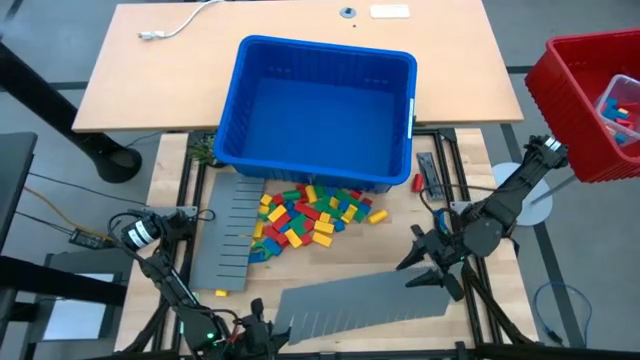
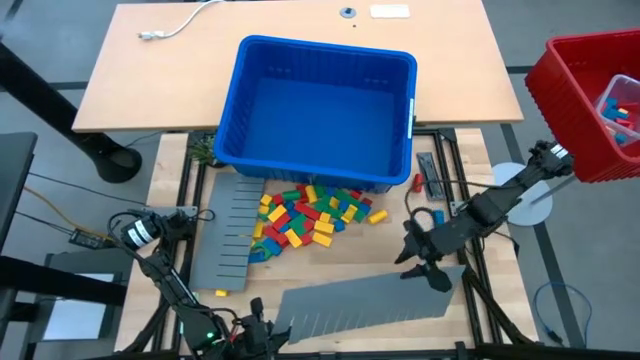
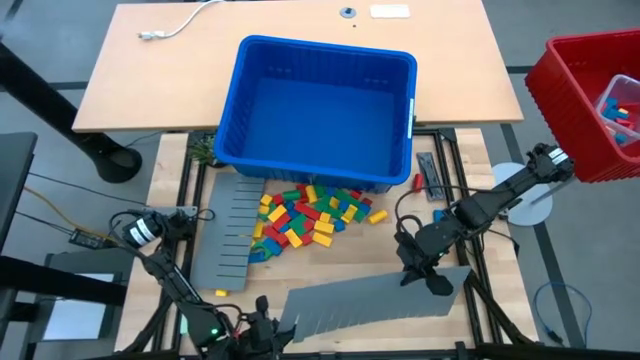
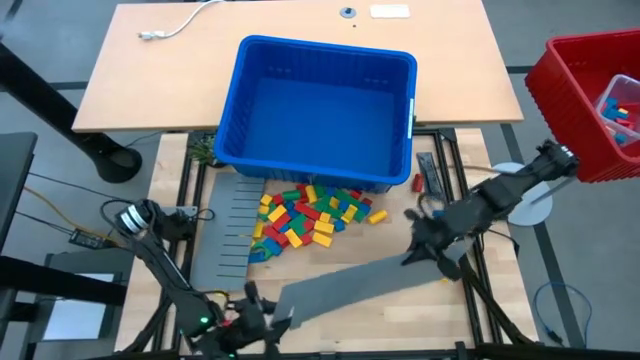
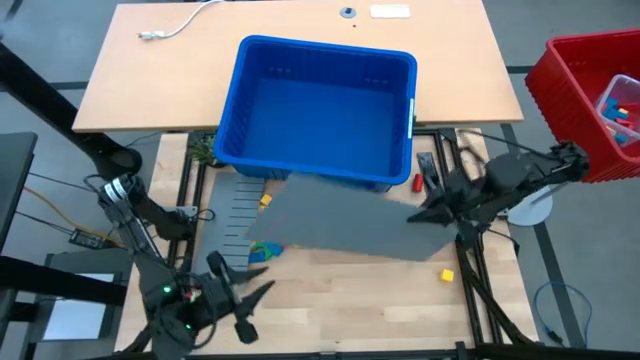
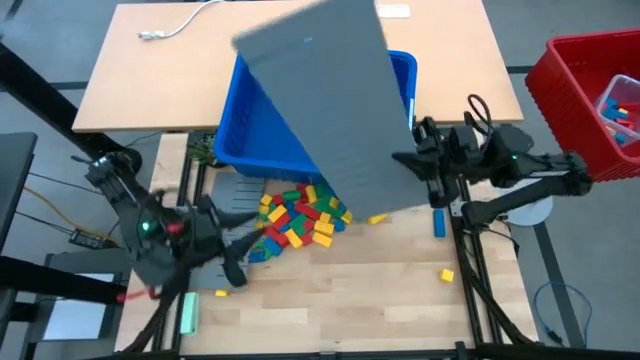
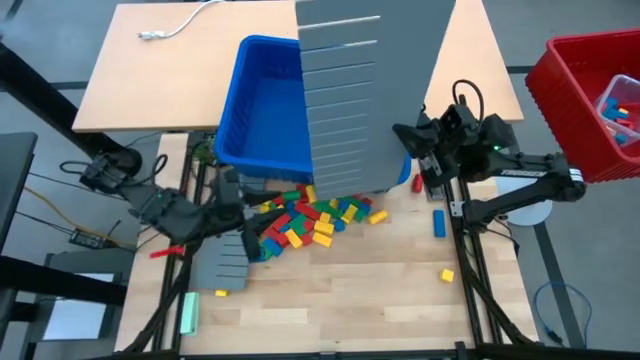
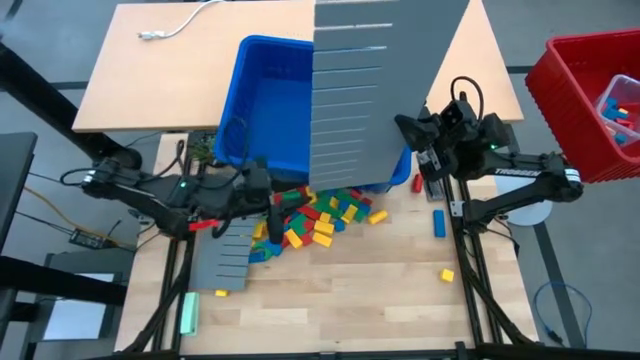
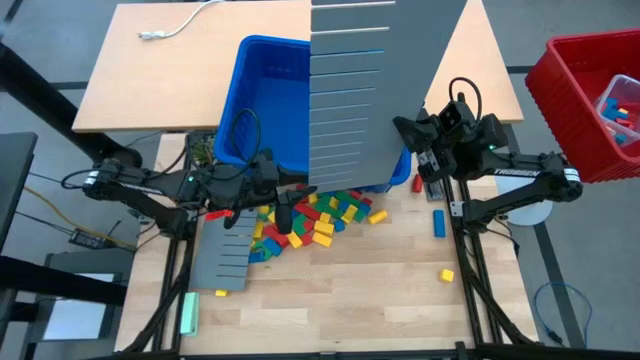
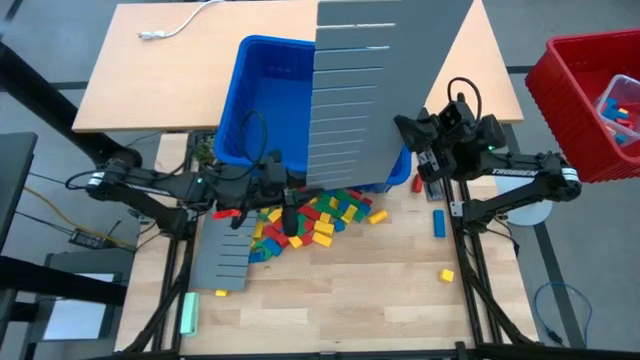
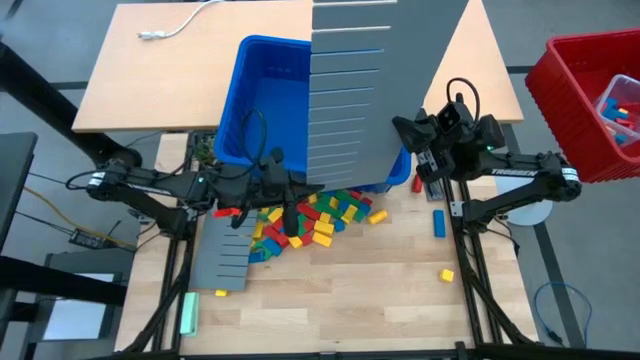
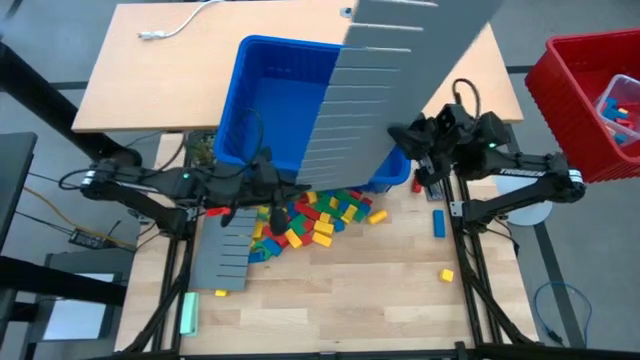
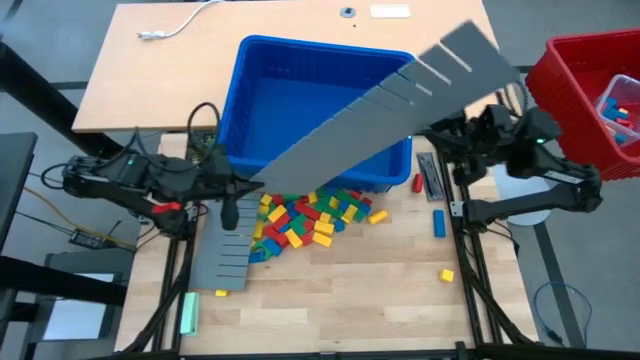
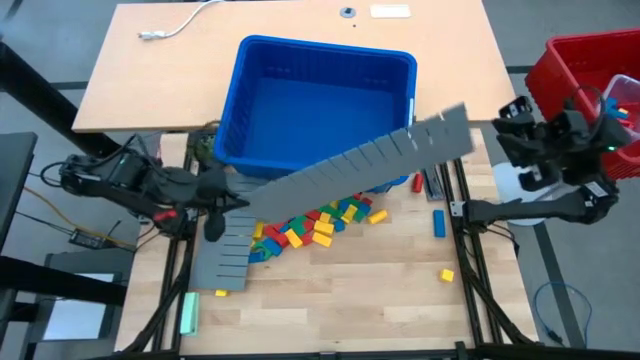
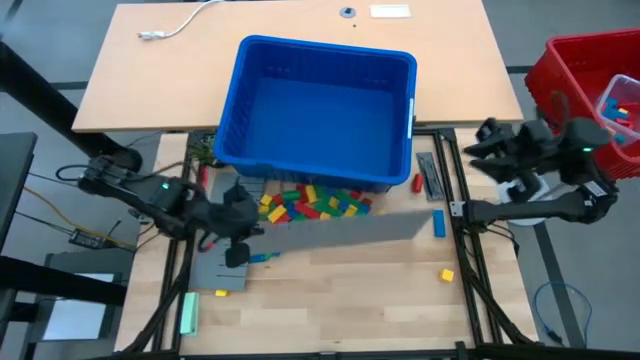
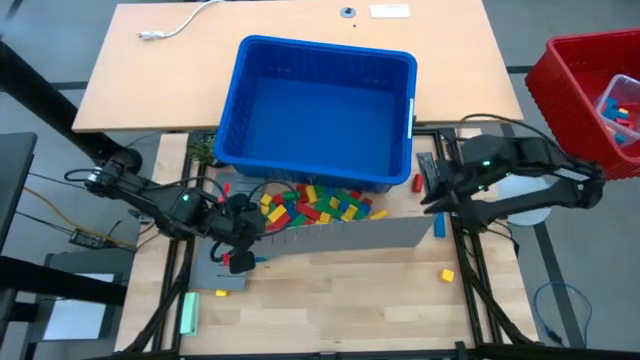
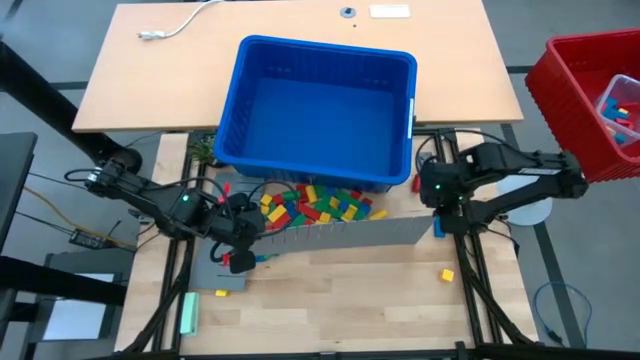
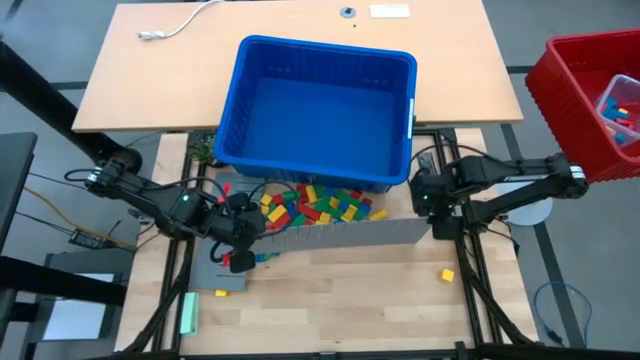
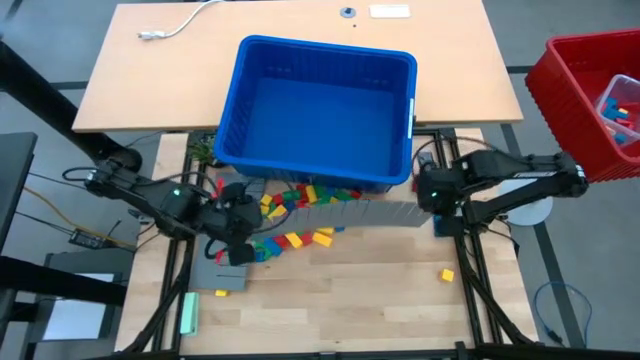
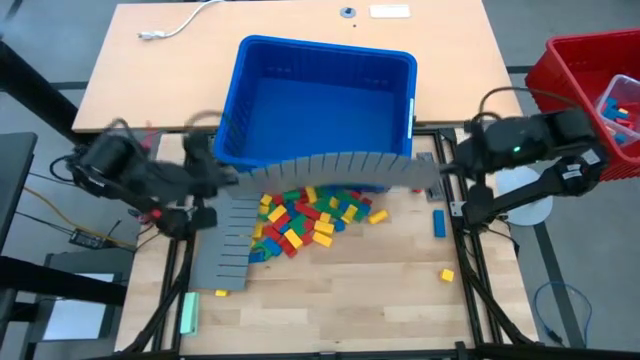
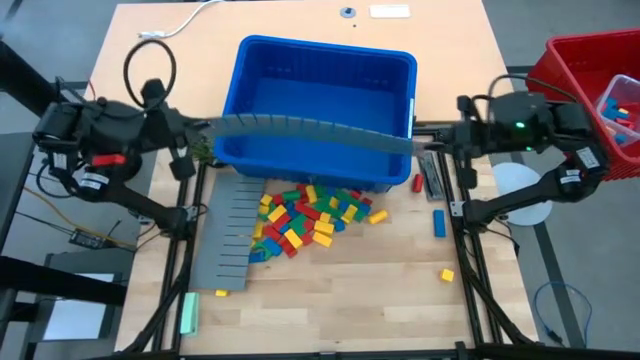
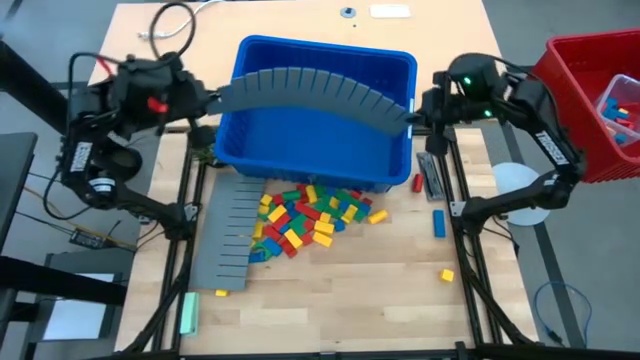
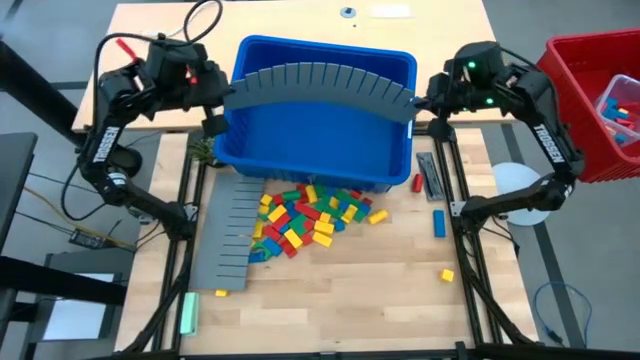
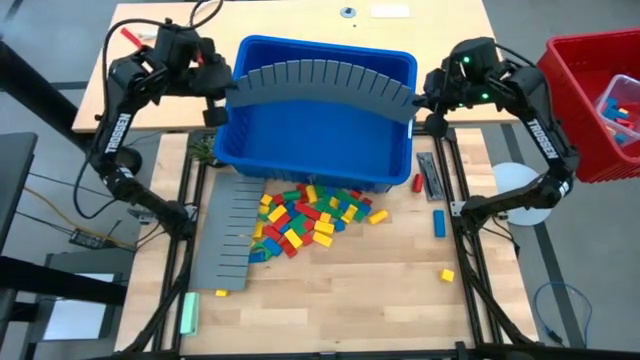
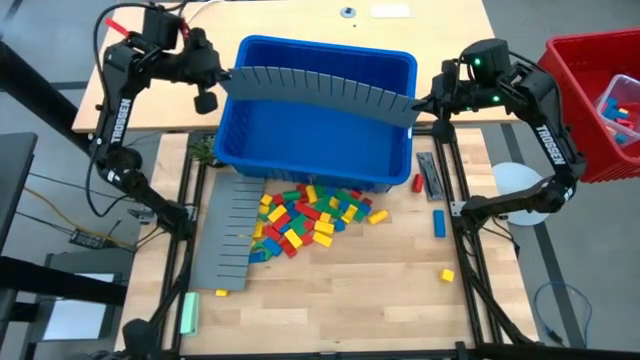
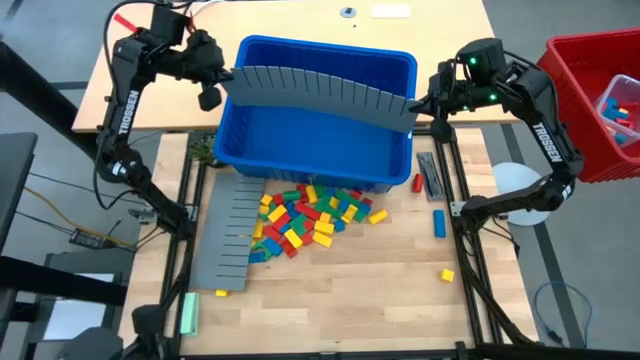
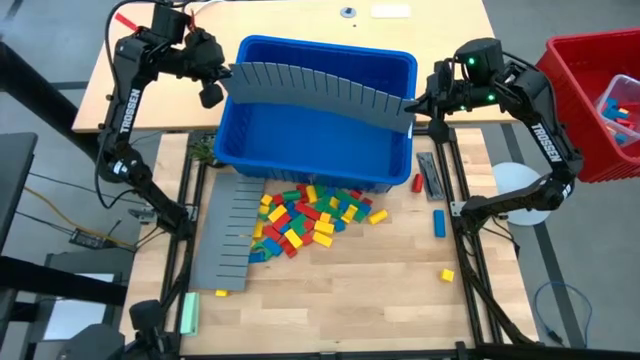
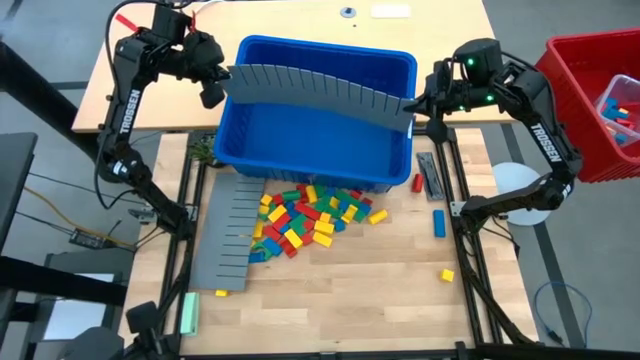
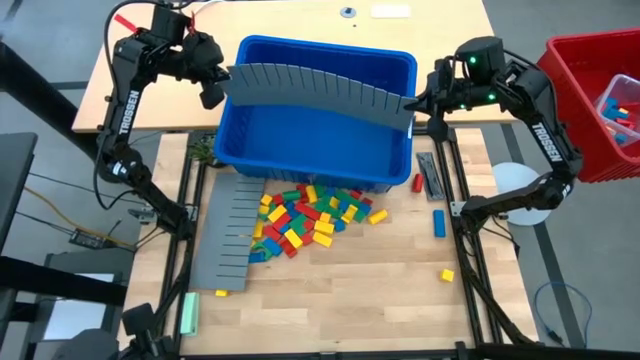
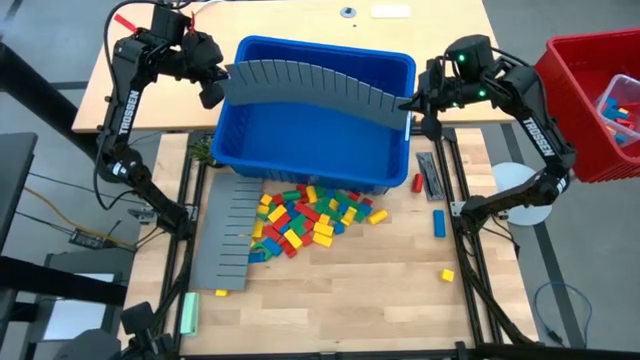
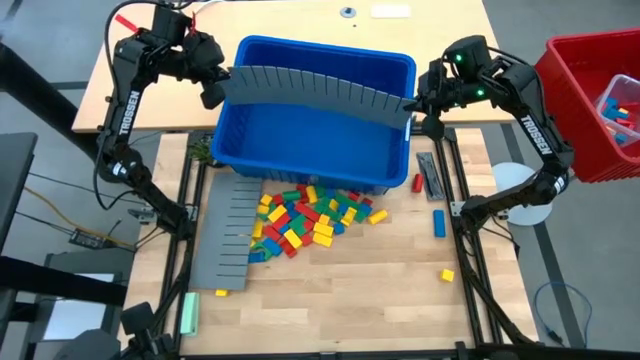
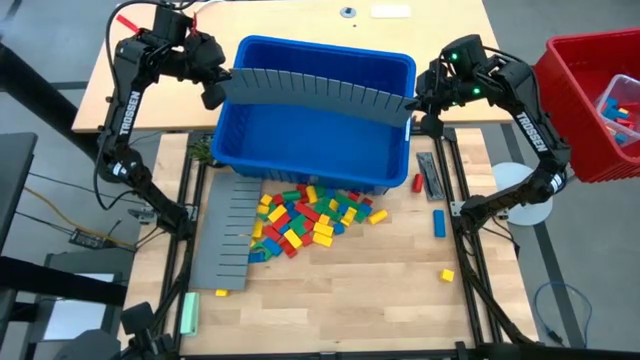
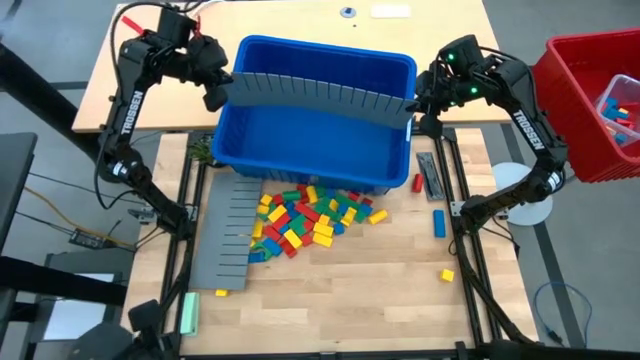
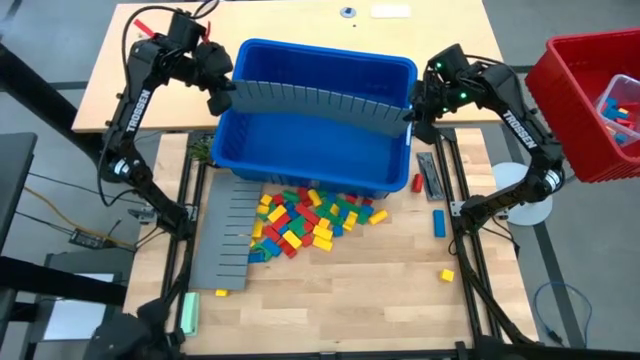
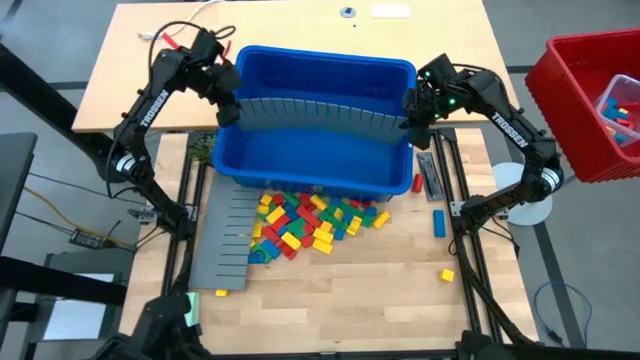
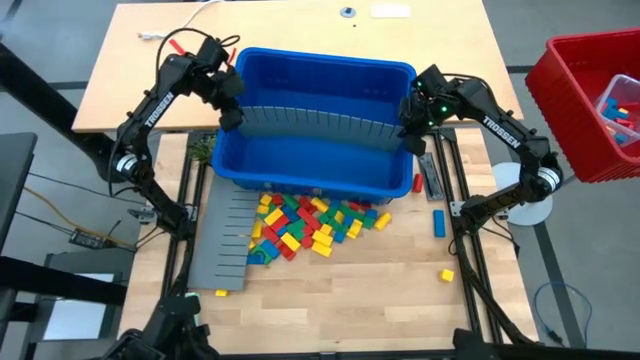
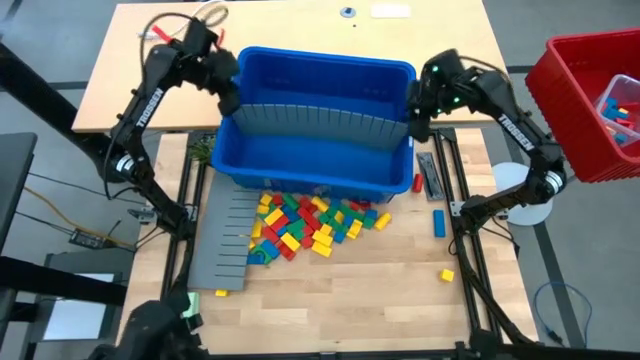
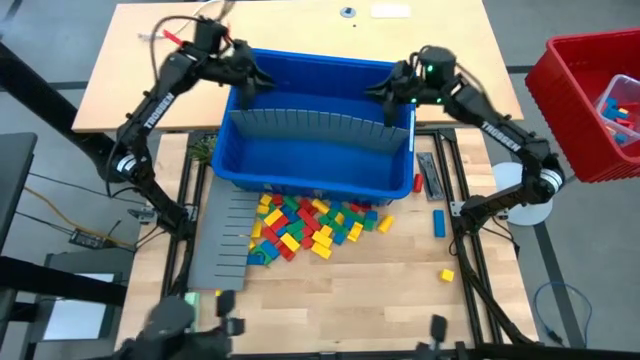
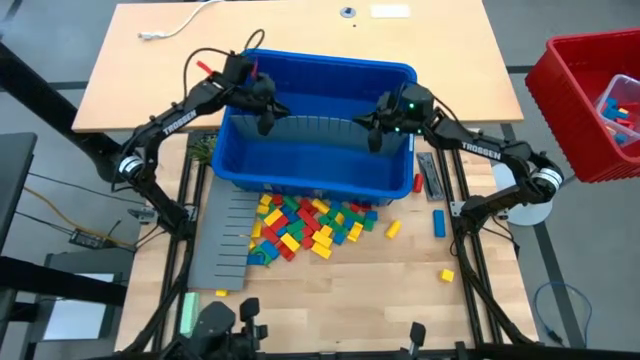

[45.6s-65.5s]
Task: Sort blocks
Assemble the blue bin using gray bin divider
